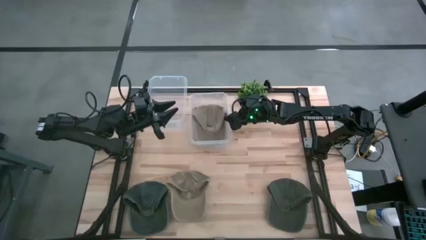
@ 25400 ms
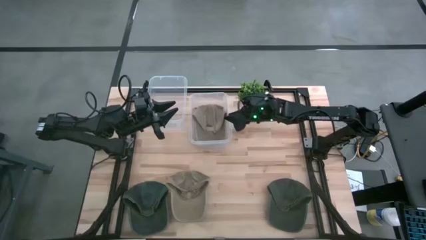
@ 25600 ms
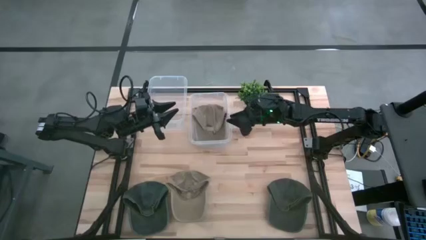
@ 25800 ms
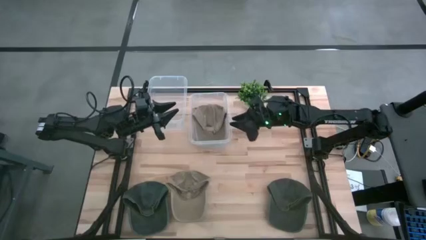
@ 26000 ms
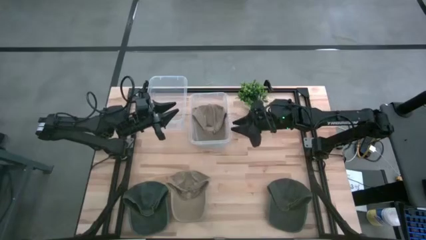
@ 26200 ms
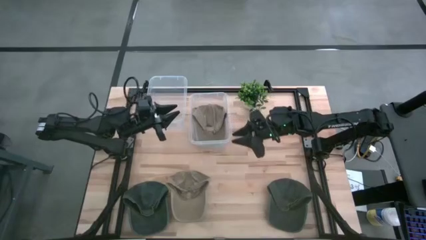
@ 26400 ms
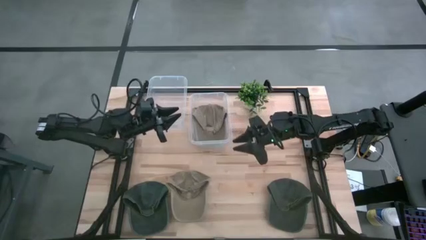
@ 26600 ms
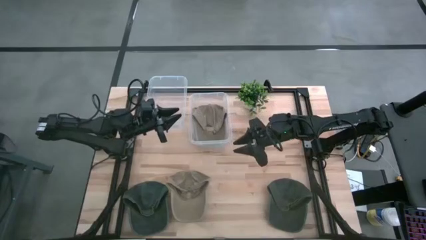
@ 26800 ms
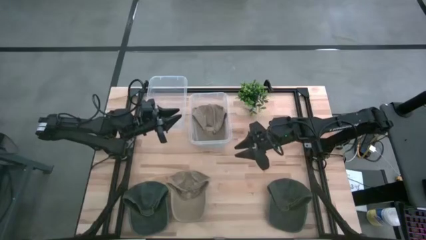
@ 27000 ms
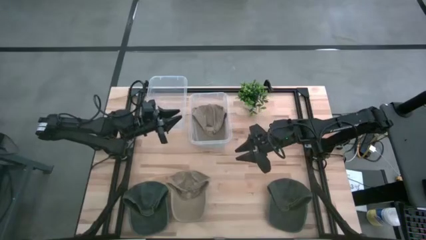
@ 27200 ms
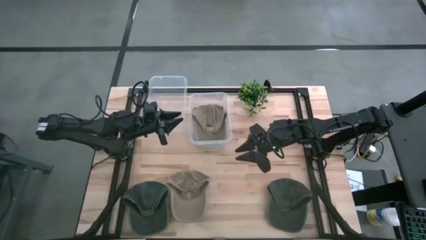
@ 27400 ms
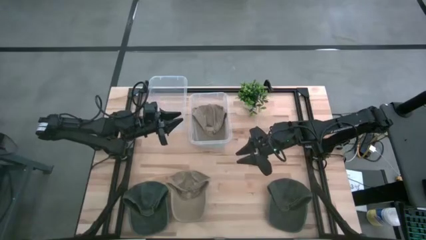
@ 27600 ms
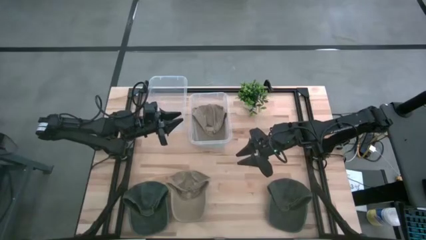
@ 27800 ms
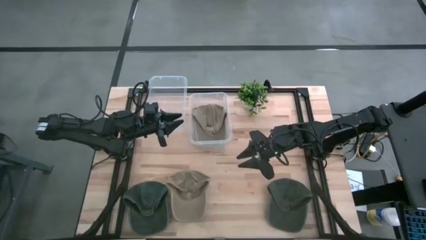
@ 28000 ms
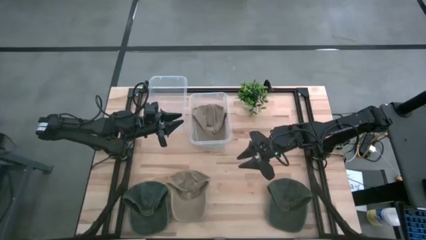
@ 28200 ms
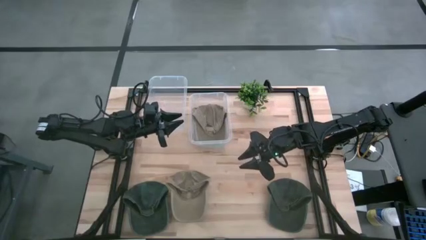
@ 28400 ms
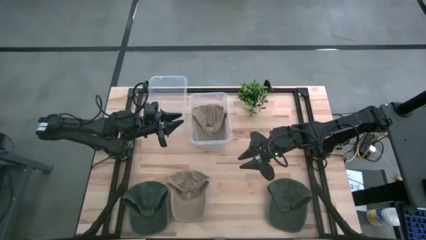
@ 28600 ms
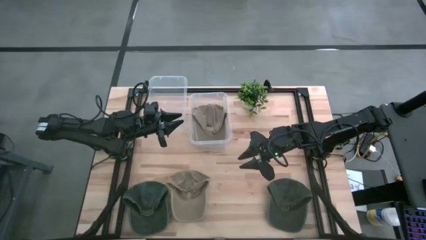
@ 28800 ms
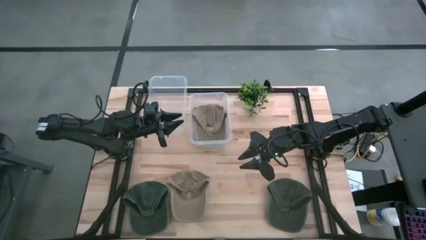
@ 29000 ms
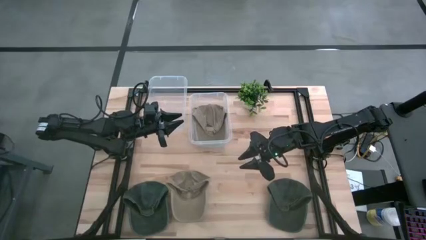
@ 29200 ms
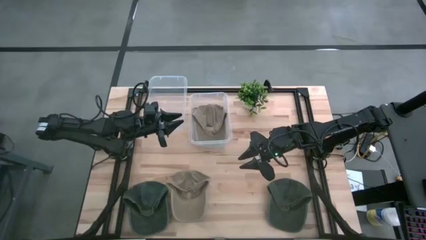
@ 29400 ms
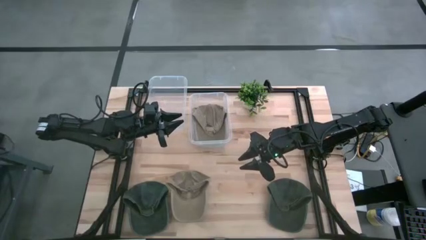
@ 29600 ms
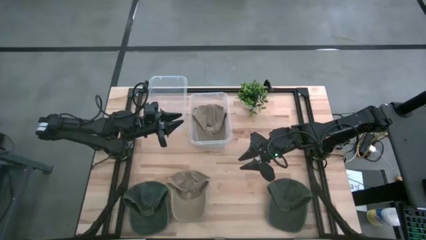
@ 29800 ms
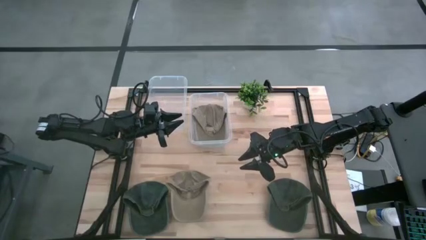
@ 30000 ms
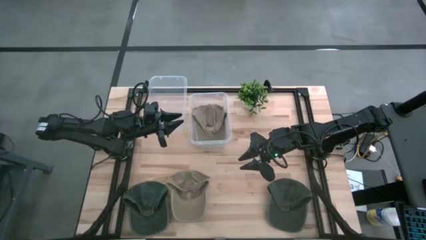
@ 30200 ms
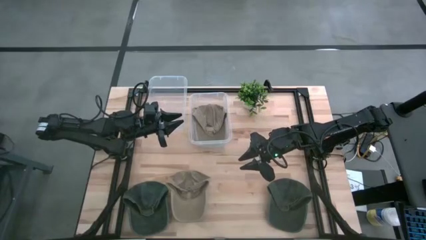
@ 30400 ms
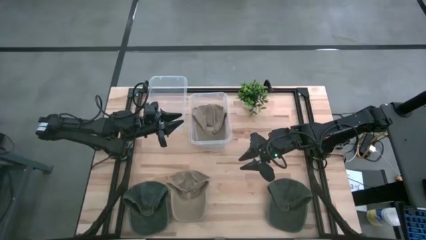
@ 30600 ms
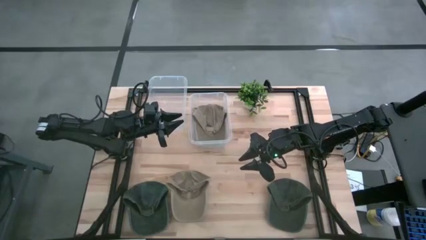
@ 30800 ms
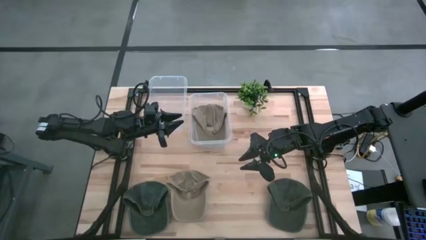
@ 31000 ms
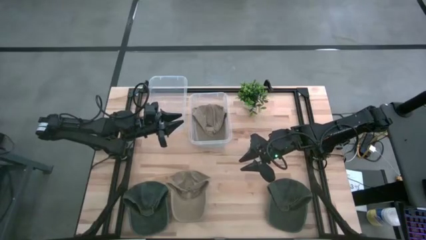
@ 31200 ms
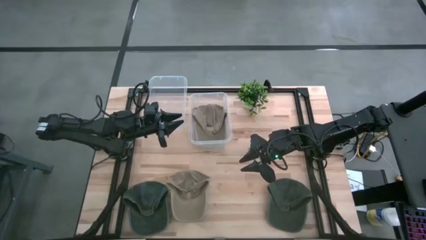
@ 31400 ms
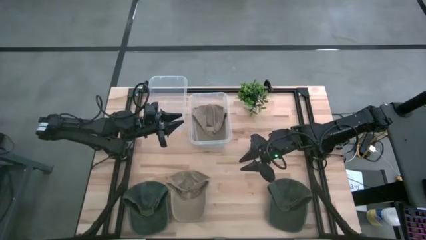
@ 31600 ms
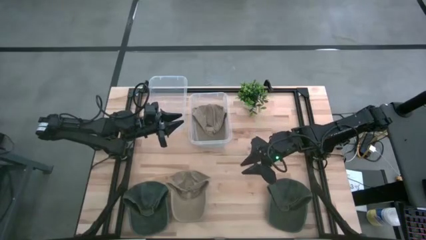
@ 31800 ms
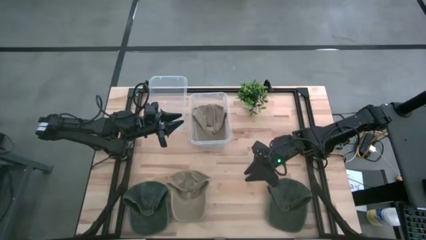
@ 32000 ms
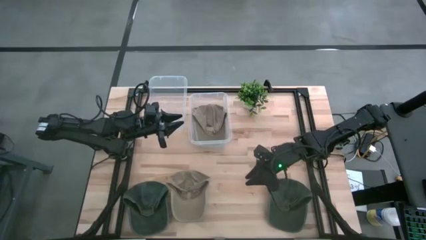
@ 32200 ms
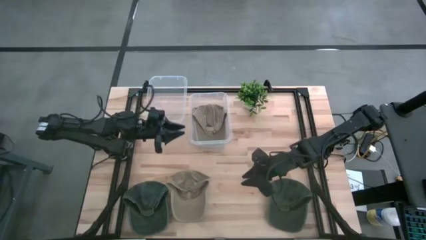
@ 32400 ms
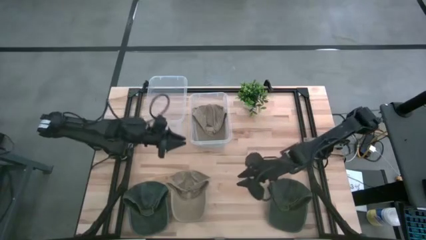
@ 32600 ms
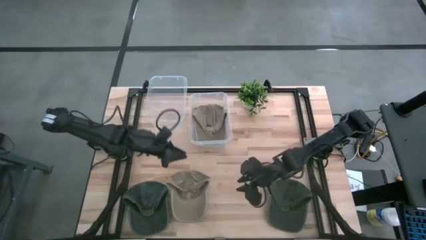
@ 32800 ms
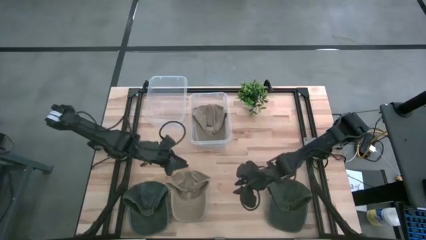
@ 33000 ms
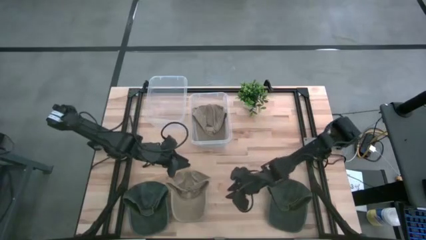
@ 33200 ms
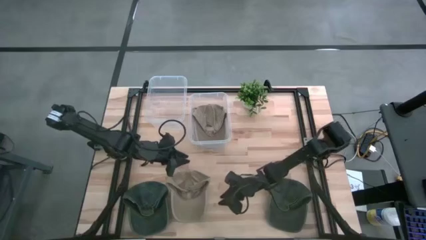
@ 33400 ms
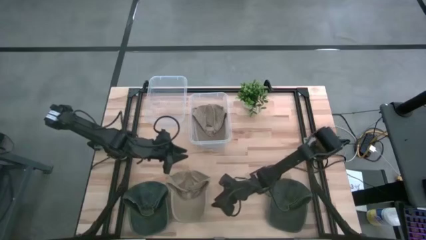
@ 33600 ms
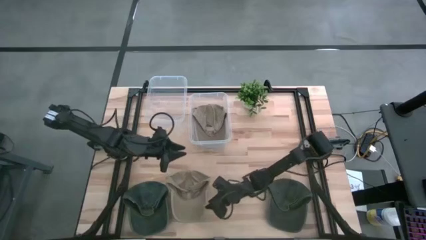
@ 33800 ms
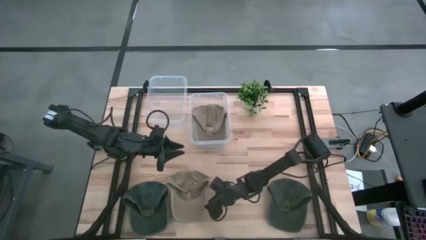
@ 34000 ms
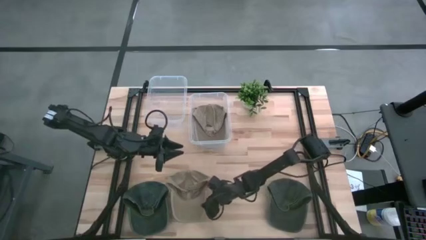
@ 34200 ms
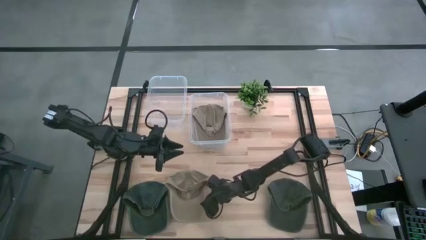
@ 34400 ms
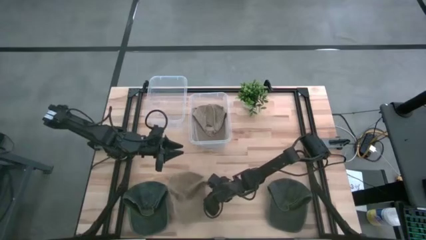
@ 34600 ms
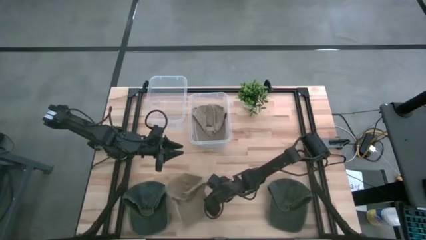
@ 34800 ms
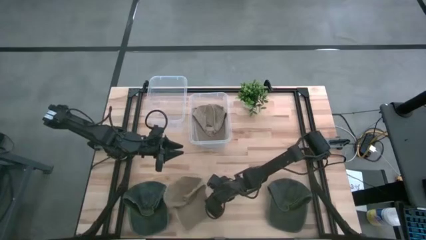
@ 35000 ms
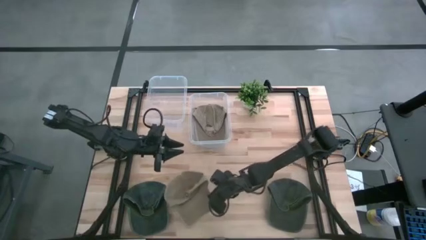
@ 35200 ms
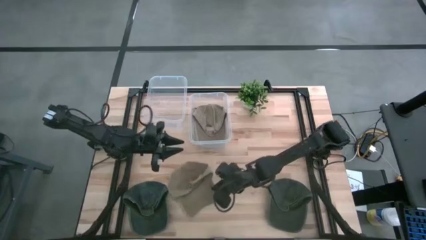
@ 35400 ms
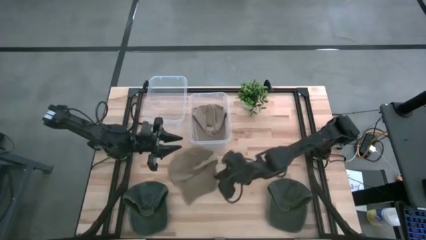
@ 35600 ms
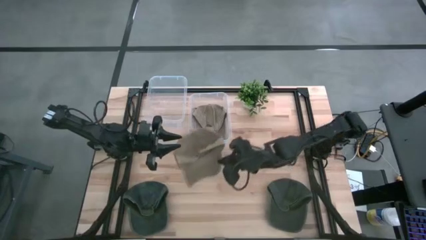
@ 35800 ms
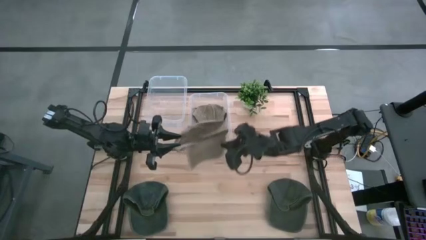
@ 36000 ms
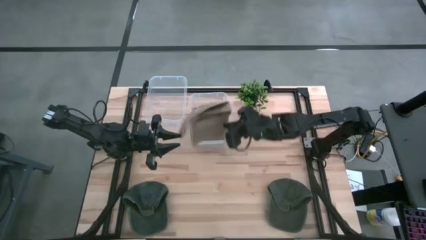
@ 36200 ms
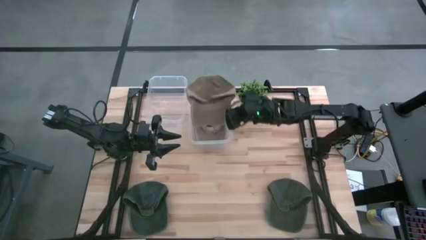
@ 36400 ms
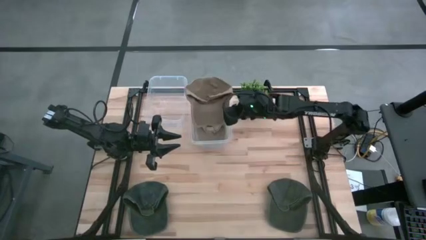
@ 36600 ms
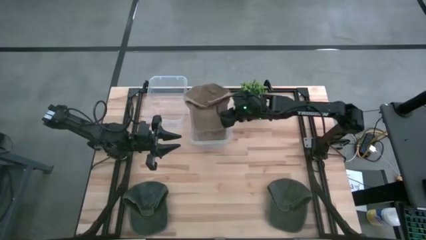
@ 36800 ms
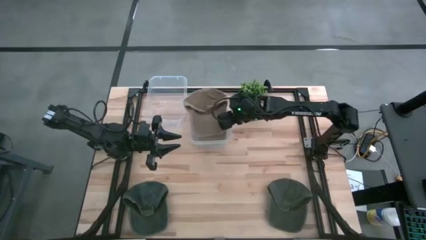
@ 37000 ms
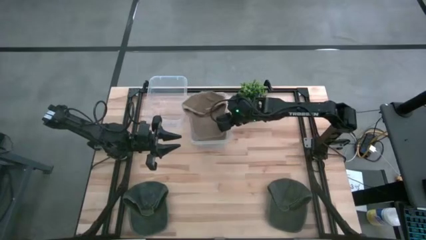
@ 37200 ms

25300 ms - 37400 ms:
Task: Pick & Place hat
Put the brown cap into the right transparent bin
